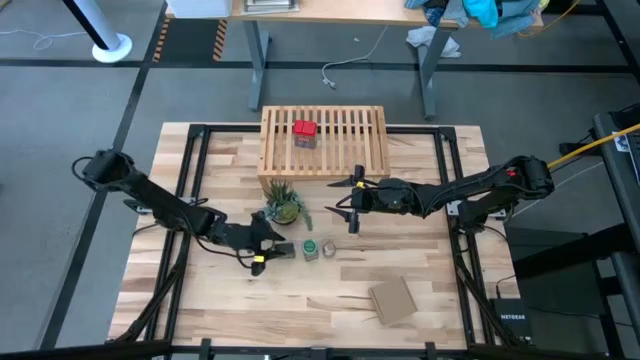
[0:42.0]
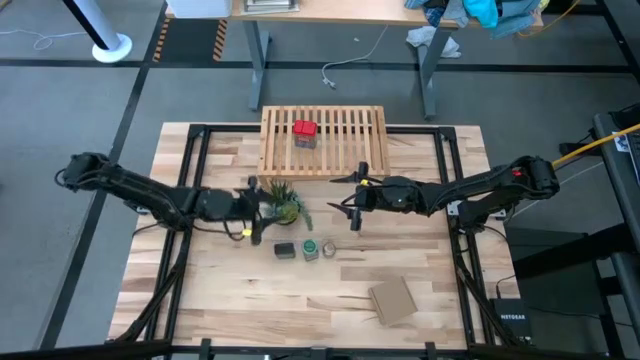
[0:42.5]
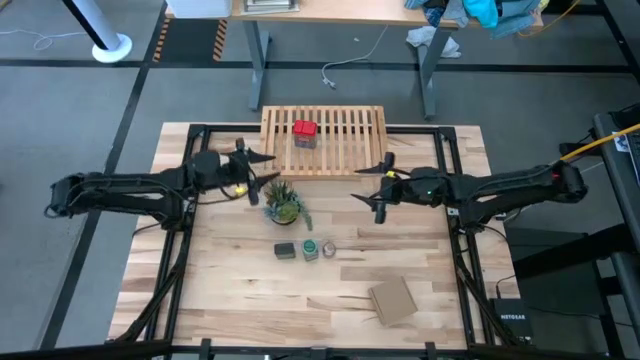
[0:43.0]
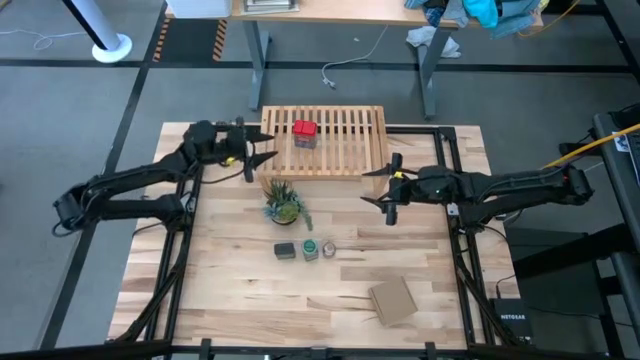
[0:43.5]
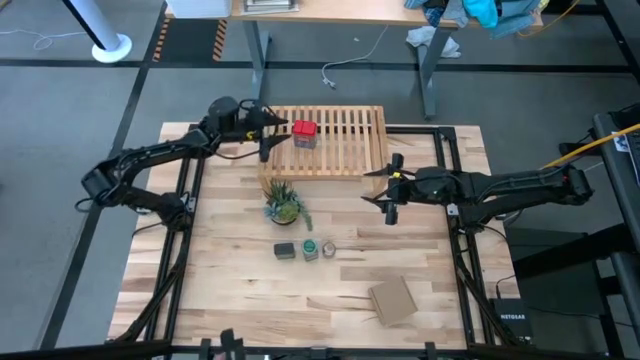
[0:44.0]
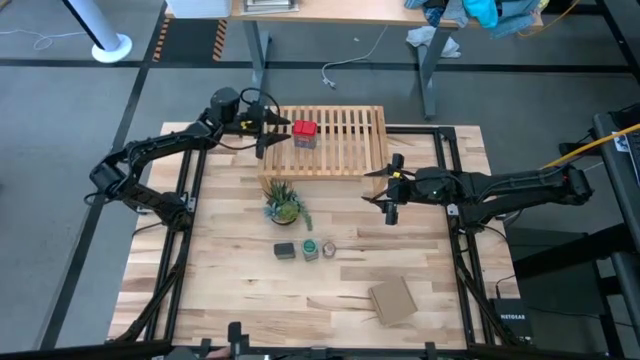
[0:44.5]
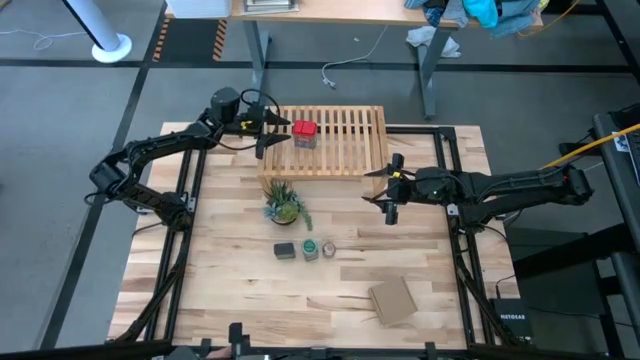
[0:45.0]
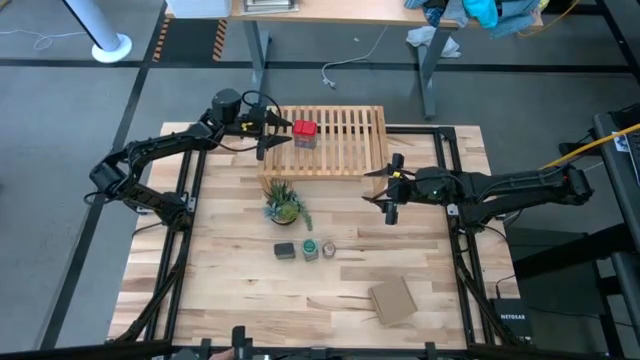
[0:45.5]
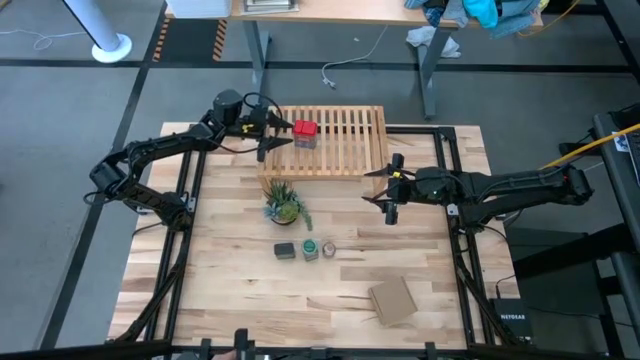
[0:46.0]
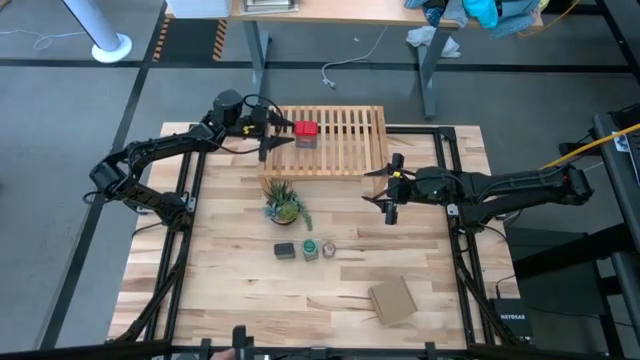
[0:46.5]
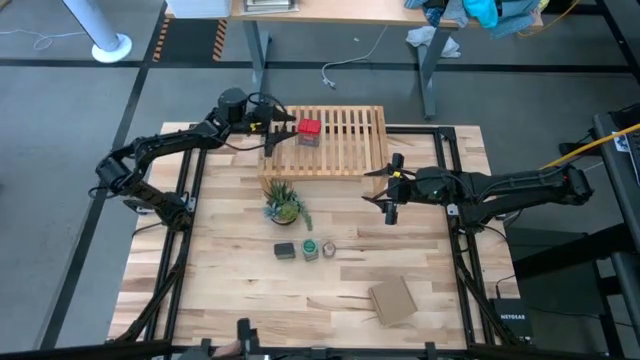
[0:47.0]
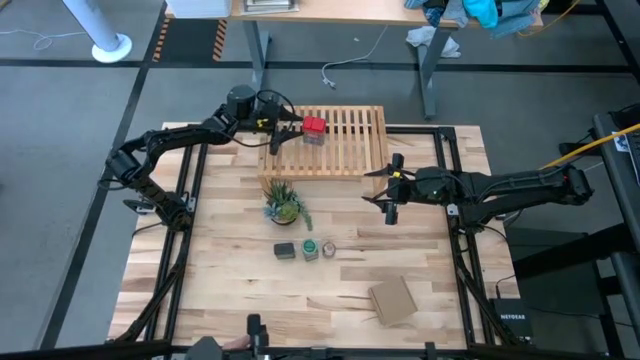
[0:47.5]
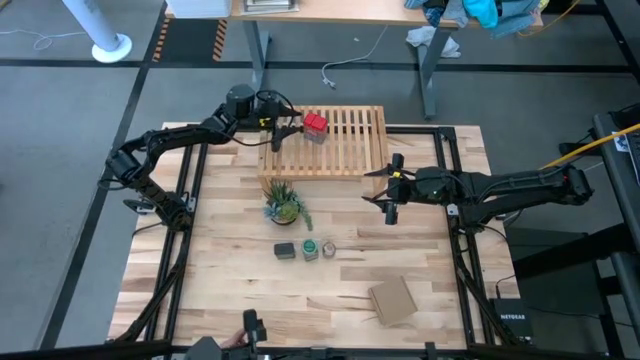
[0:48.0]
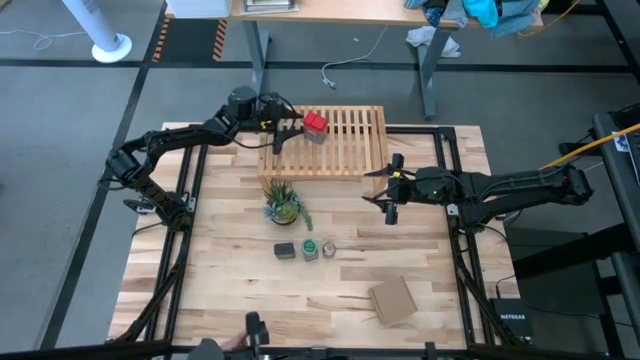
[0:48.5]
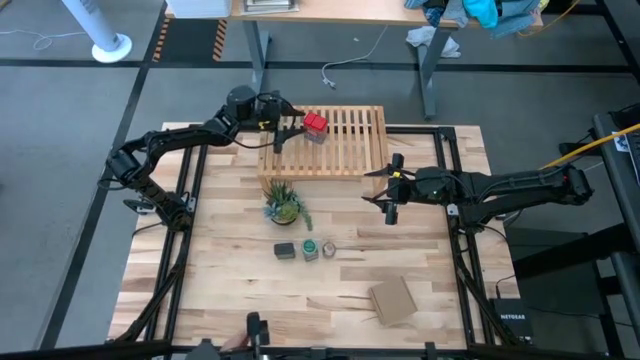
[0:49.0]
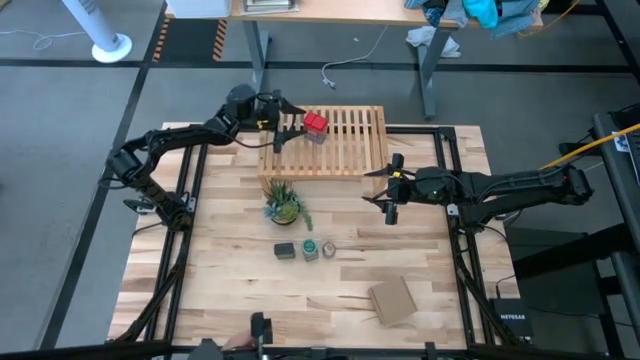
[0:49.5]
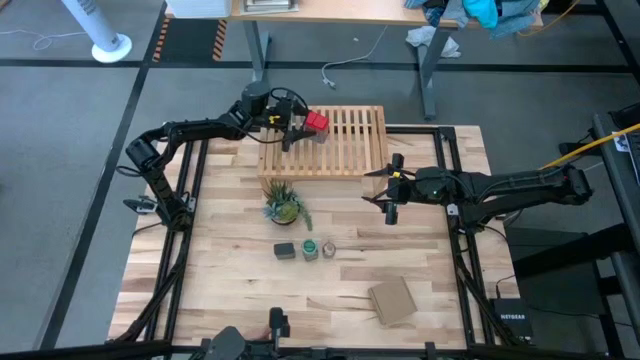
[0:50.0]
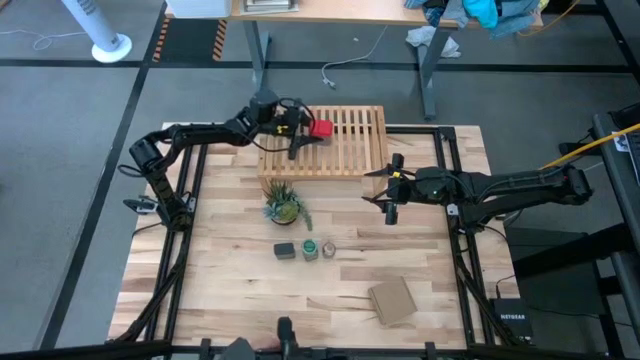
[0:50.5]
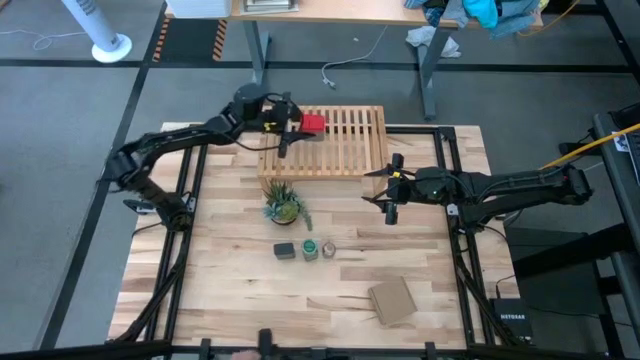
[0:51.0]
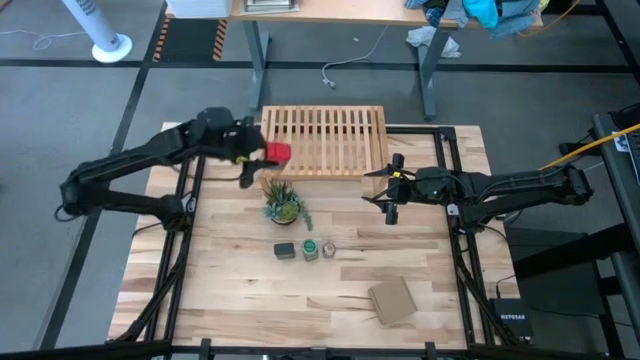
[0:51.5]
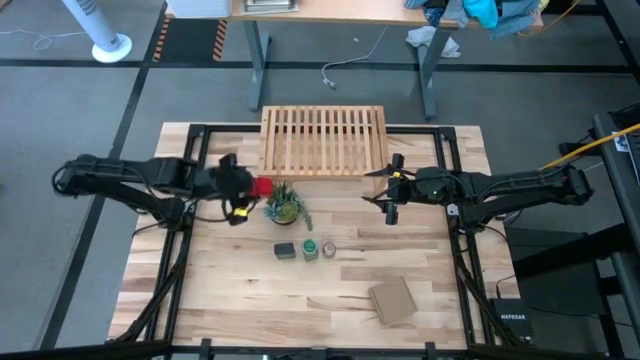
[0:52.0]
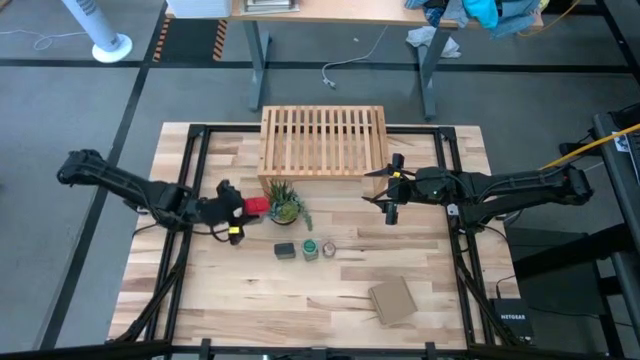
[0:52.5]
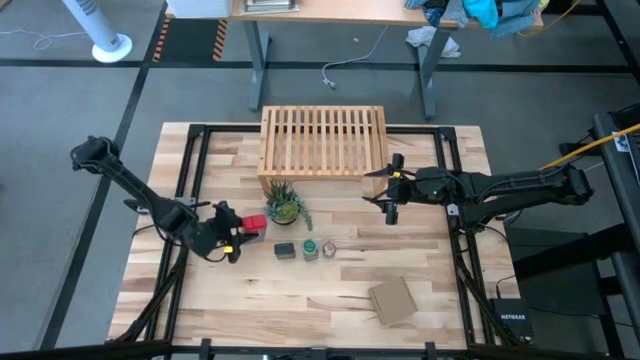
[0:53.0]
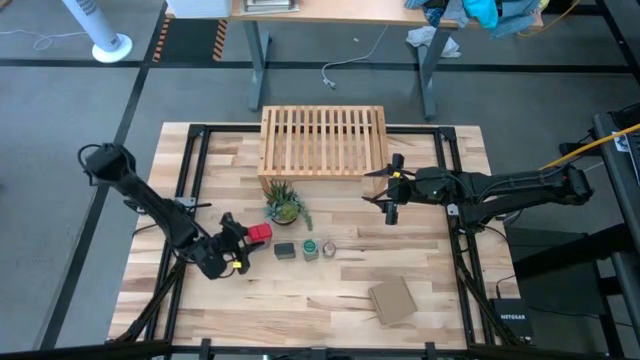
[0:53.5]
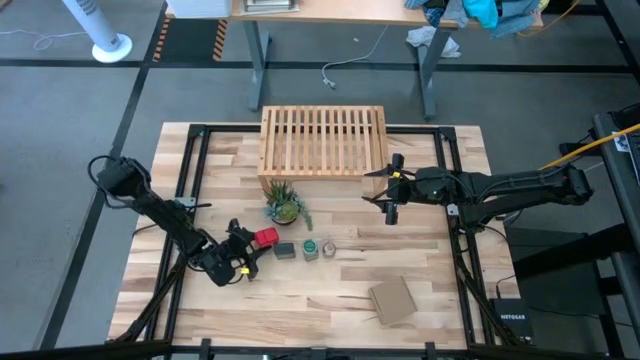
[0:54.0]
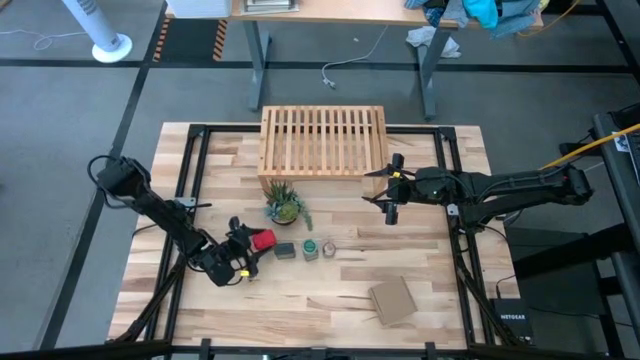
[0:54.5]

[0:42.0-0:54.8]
Task: Shelf spices
Remove the red seasoning can from the shelf
